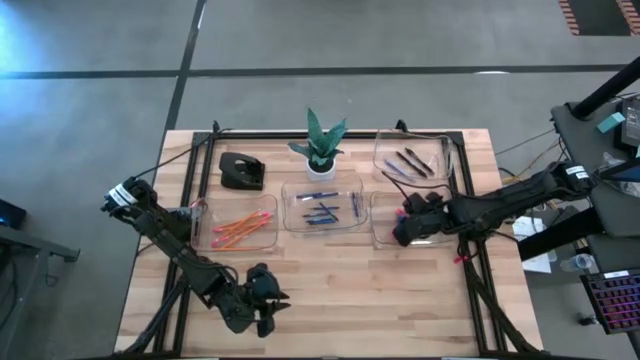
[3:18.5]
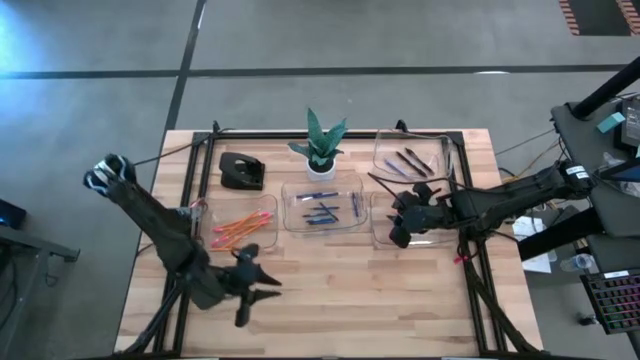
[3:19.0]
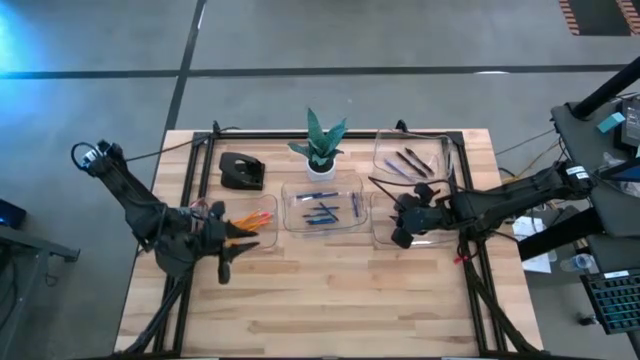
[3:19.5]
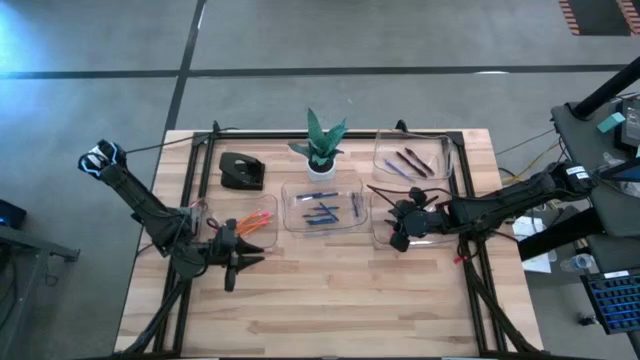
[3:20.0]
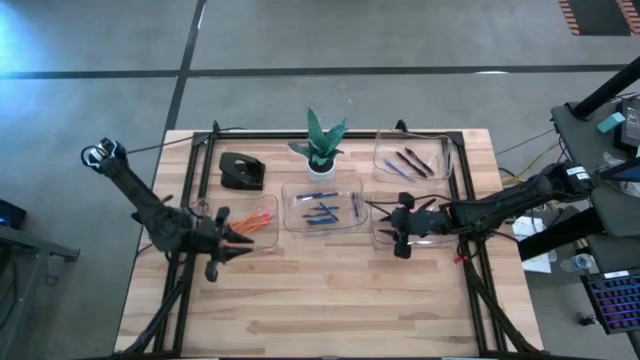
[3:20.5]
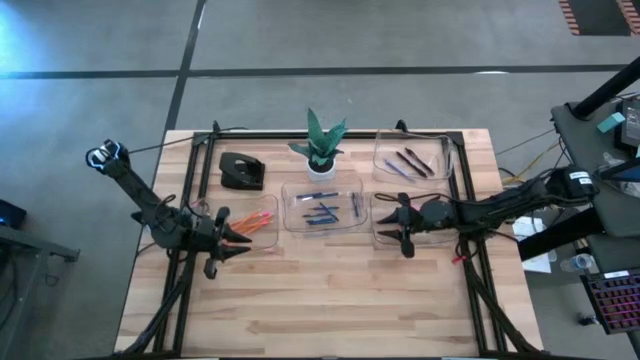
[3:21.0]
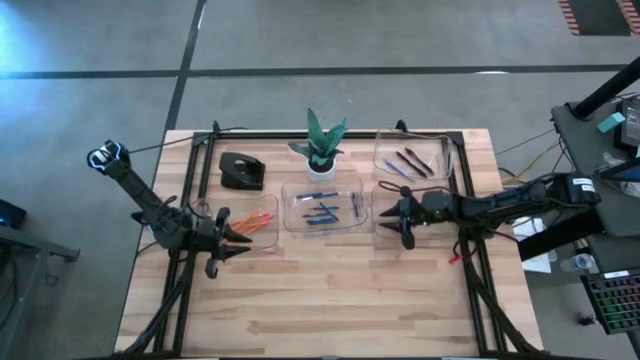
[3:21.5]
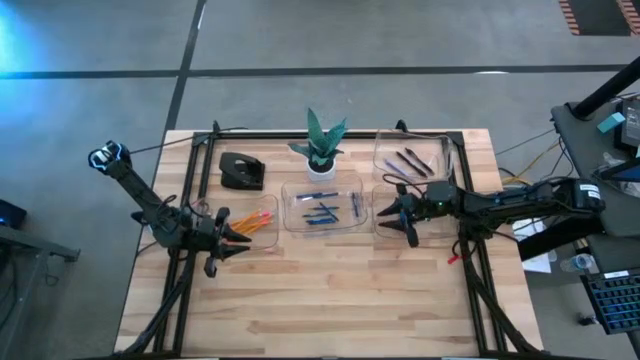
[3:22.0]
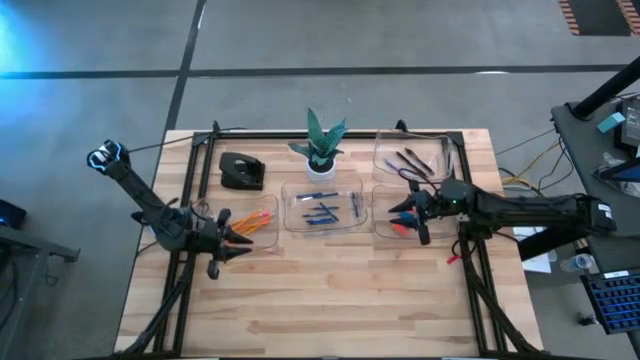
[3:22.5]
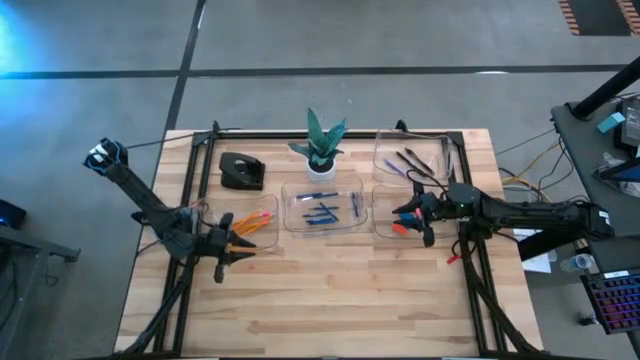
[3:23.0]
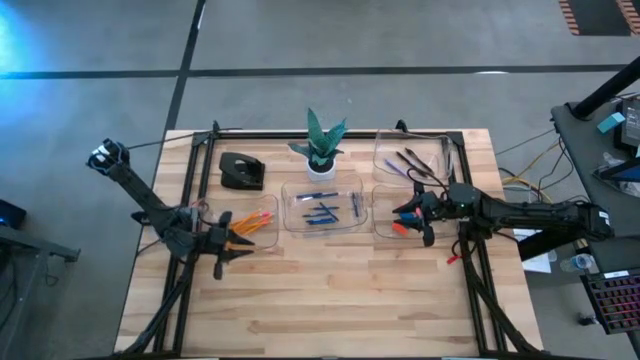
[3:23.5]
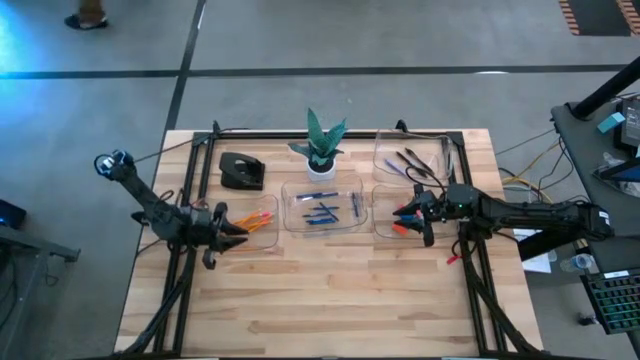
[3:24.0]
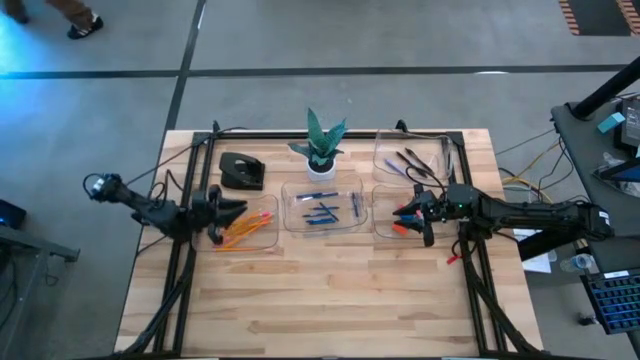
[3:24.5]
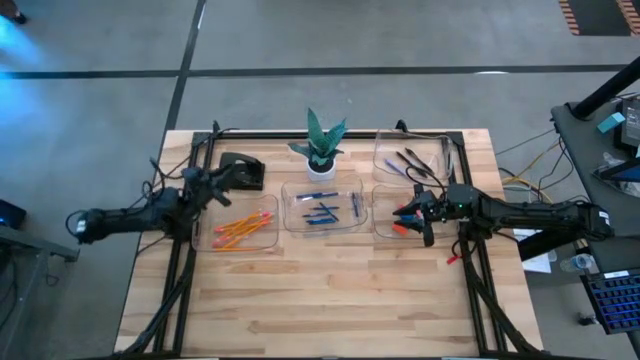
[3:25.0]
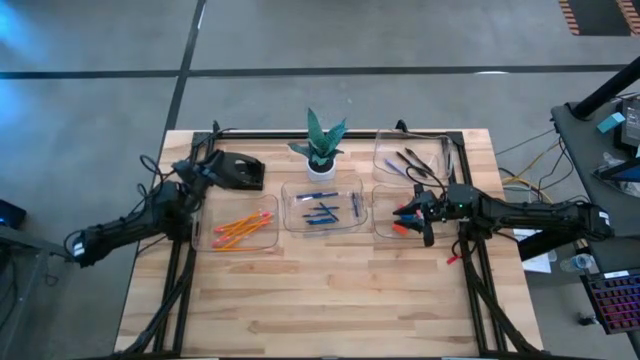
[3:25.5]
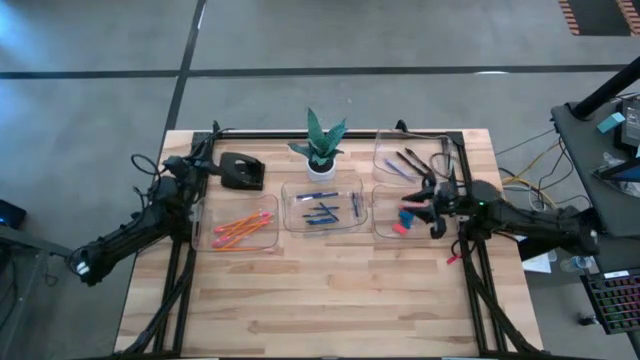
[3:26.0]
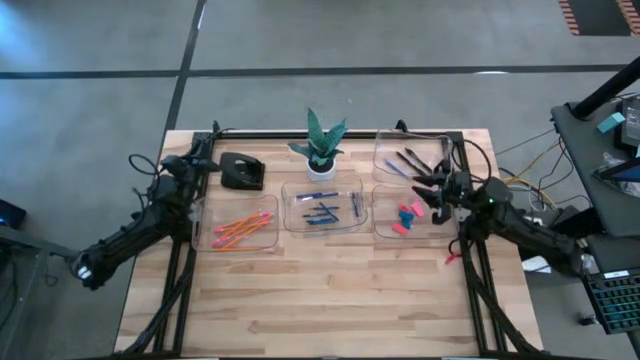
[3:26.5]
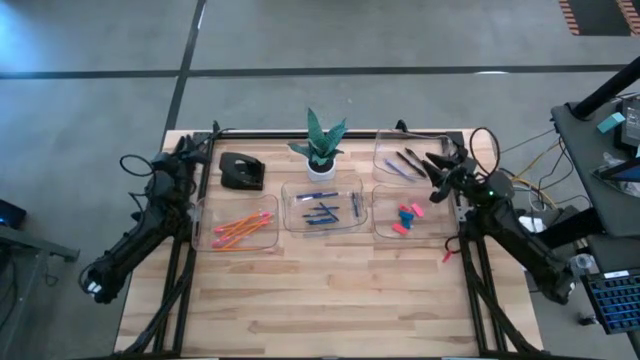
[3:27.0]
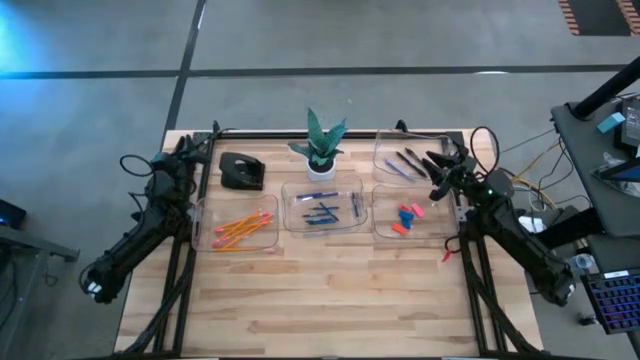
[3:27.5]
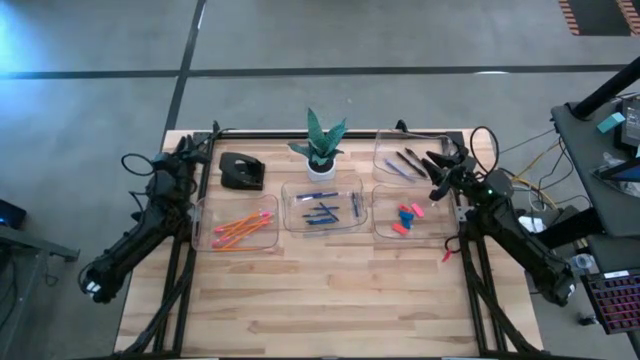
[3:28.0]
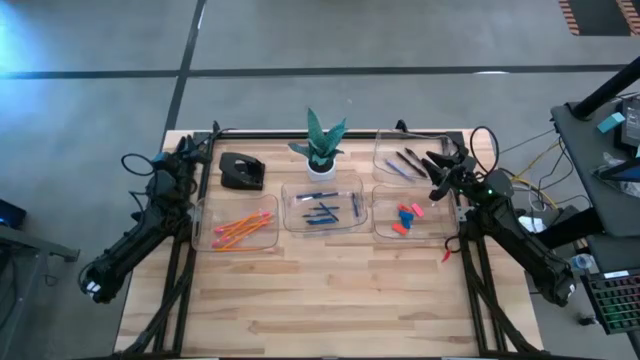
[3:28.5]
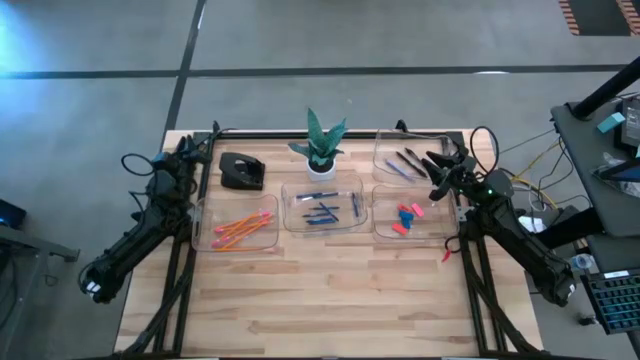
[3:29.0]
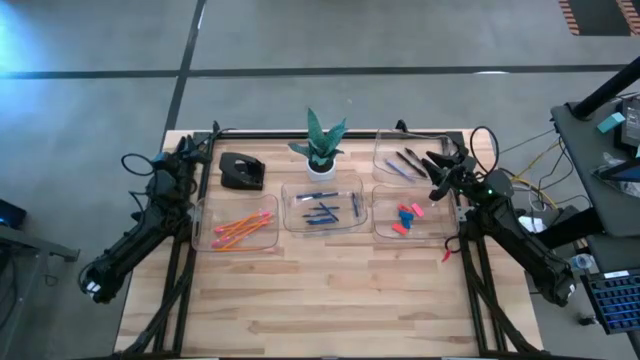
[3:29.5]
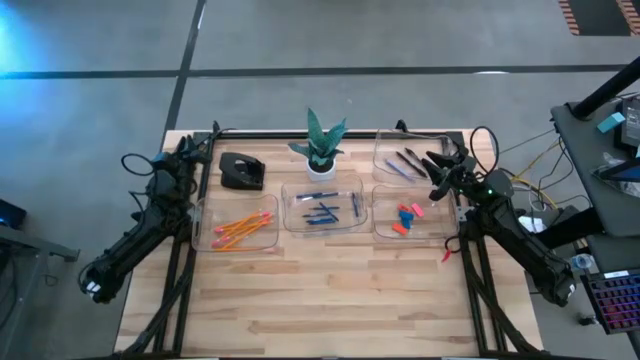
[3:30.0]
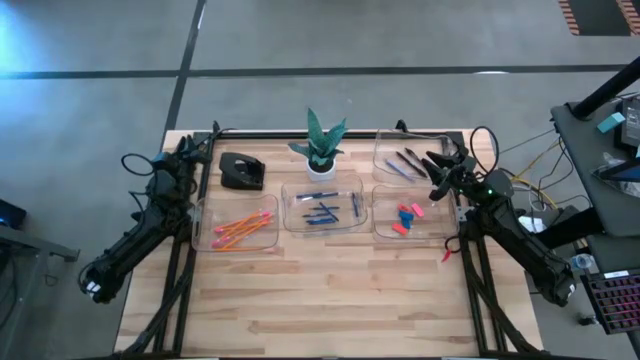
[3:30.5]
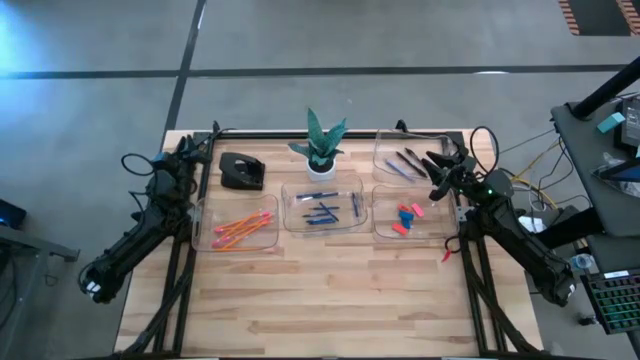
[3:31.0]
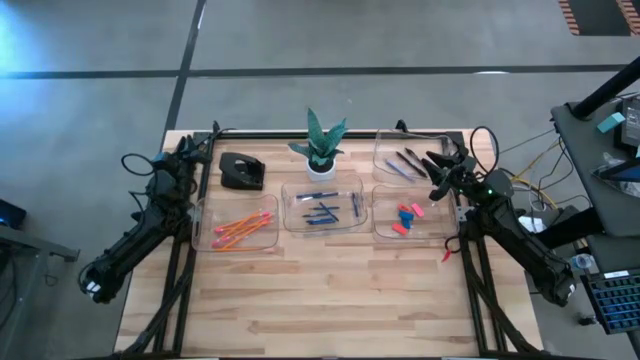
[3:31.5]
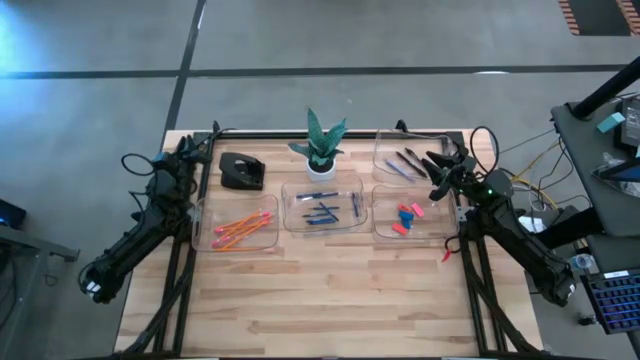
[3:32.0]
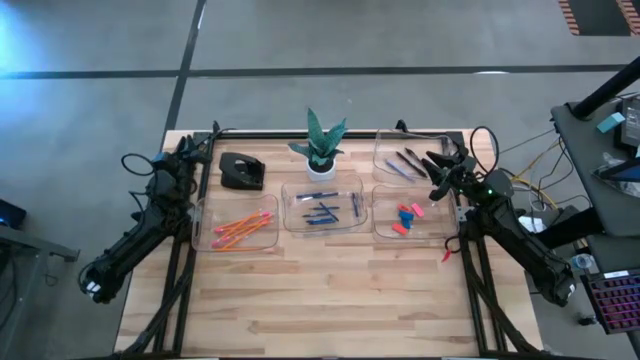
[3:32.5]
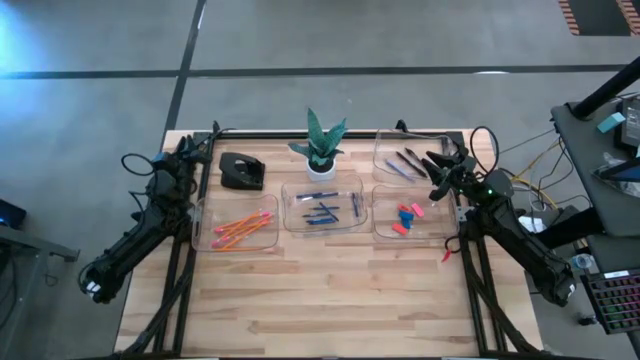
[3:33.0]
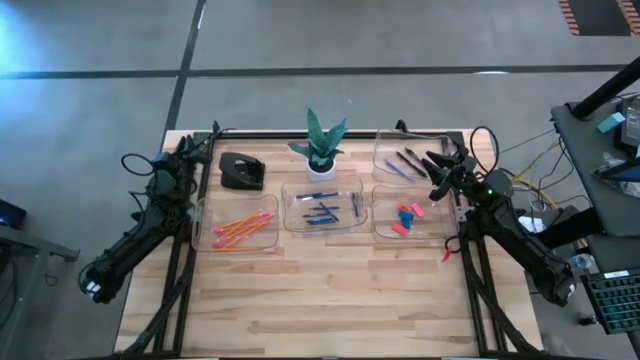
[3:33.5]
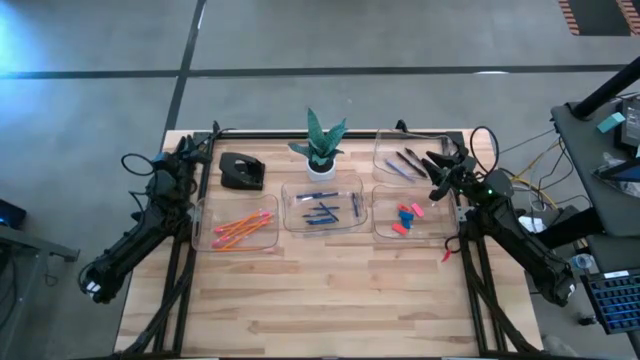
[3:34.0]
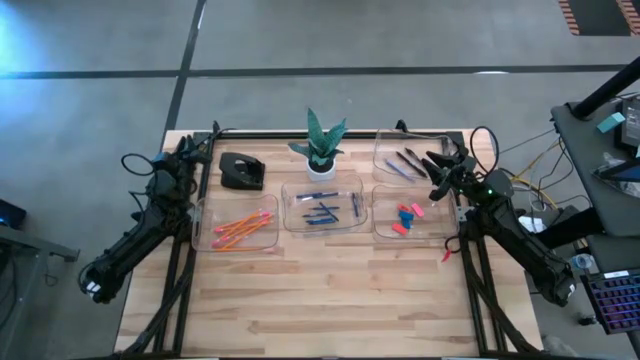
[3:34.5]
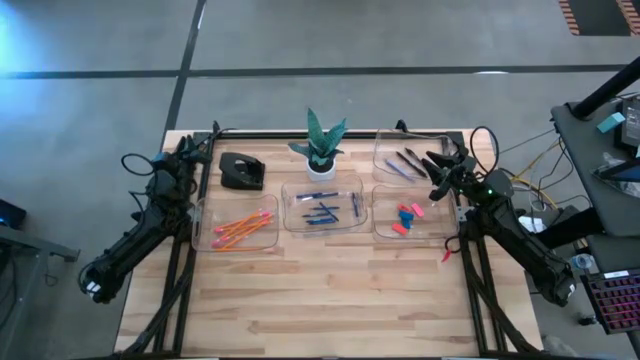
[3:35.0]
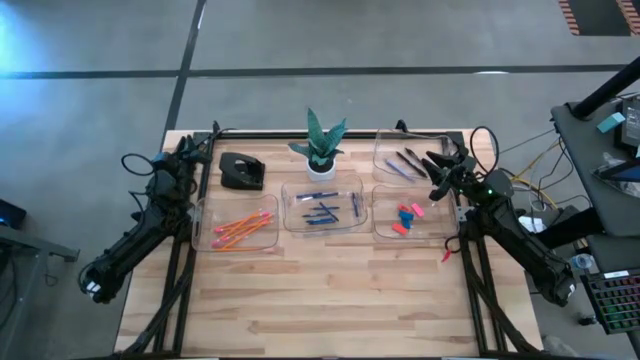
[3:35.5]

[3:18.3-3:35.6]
Task: Sort crayons/erasers/pens/pencils in bins
Return to Home Position

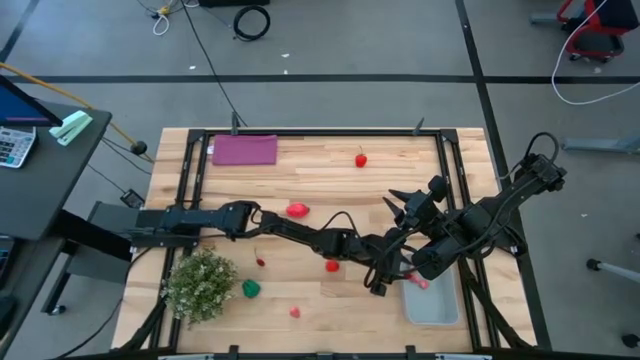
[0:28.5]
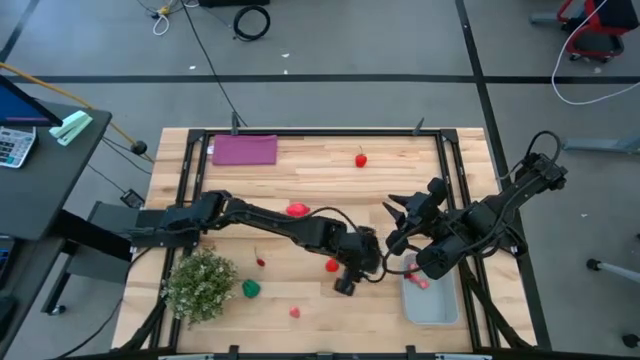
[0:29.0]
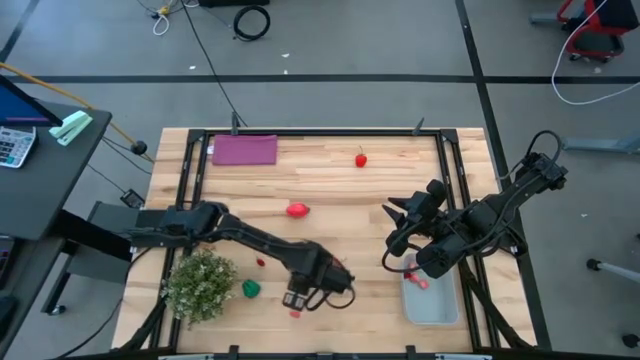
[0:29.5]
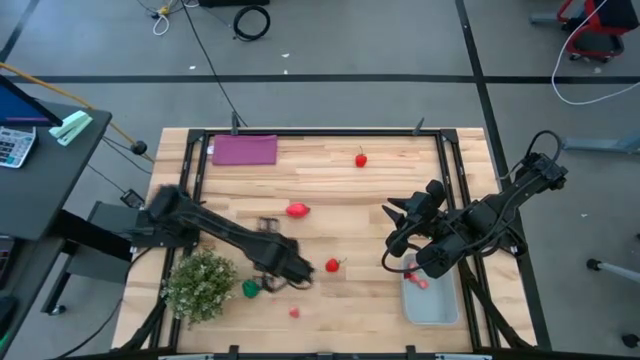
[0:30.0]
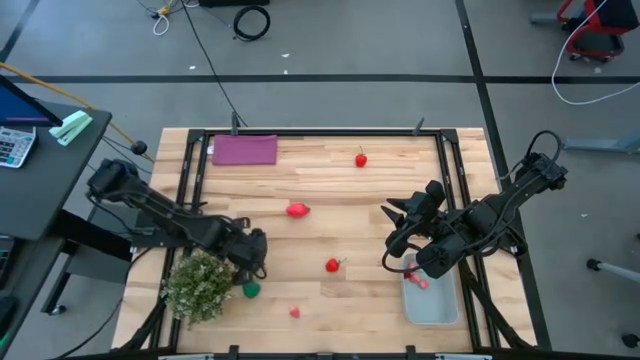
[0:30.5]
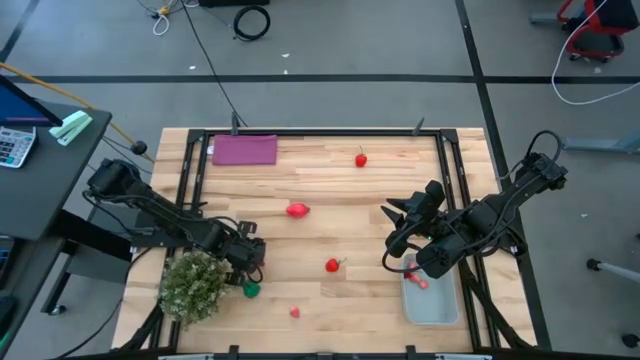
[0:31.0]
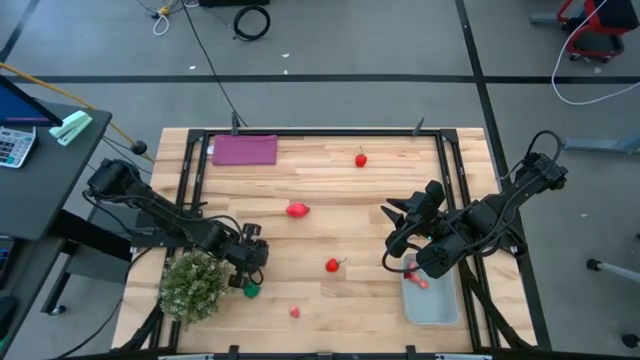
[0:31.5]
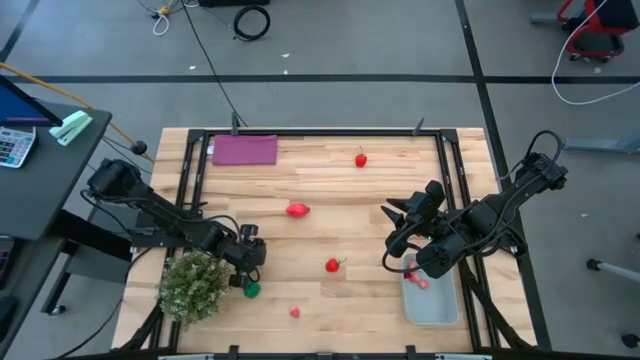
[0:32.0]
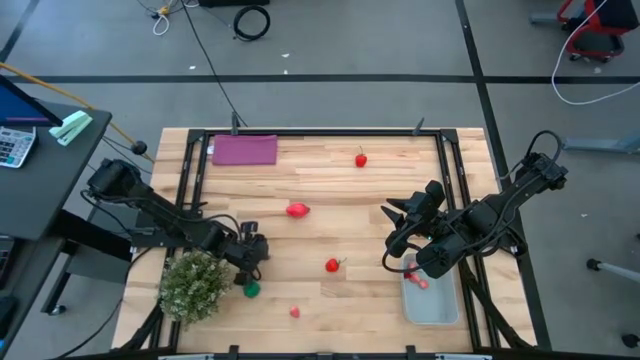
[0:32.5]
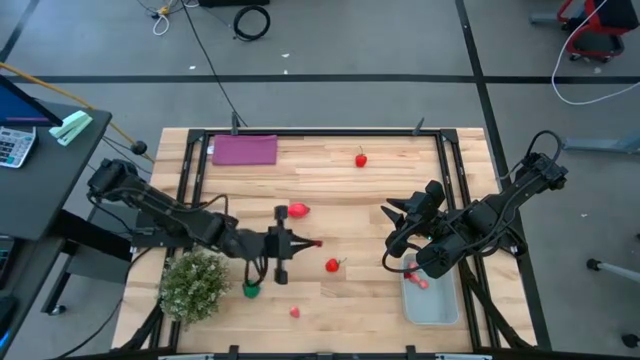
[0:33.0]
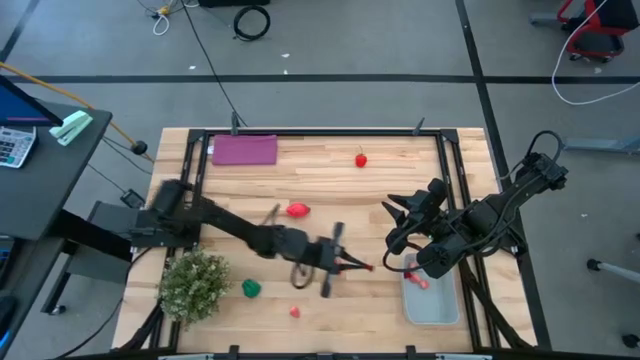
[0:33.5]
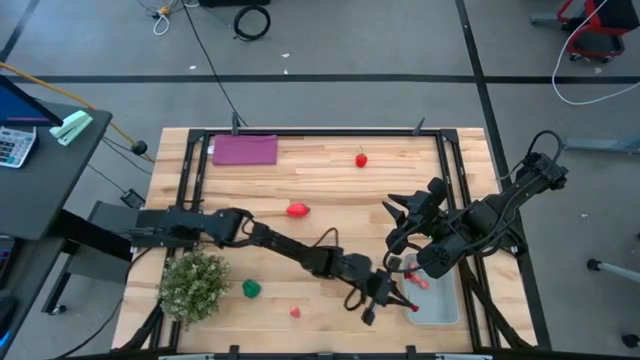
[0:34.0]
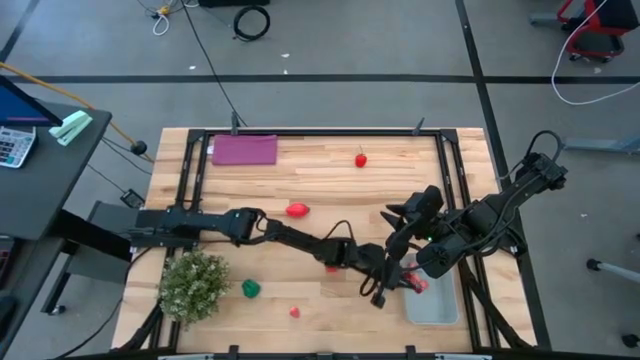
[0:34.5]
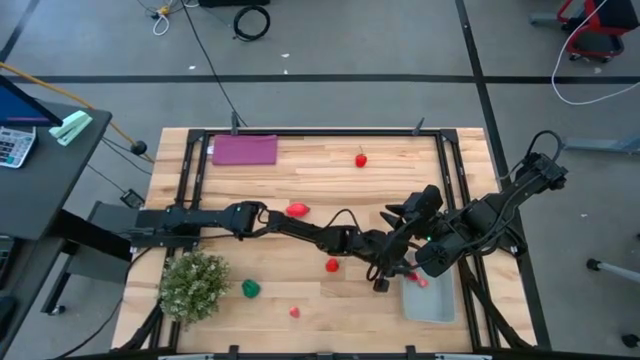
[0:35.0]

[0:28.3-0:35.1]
Task: Pick and placing Produce into tupperware
Put the red cherry into the gray bin
